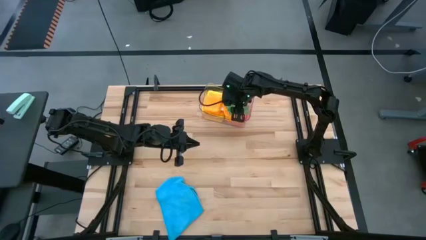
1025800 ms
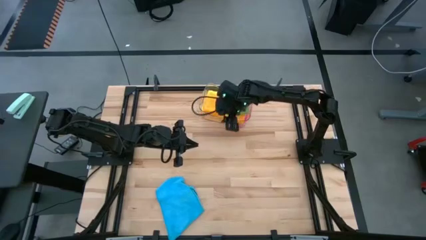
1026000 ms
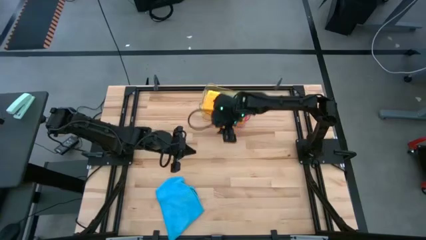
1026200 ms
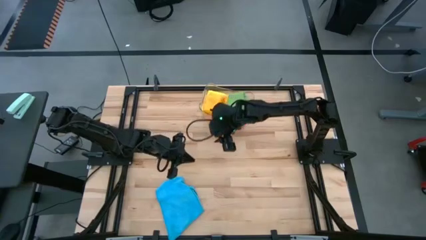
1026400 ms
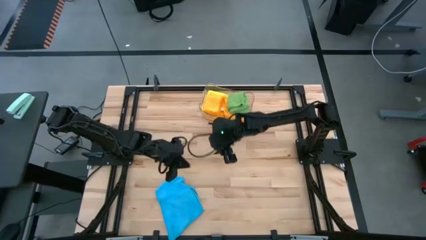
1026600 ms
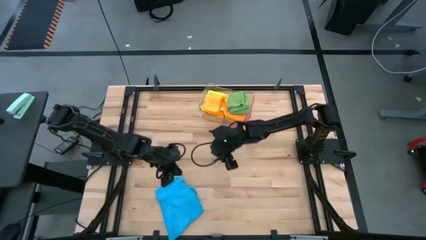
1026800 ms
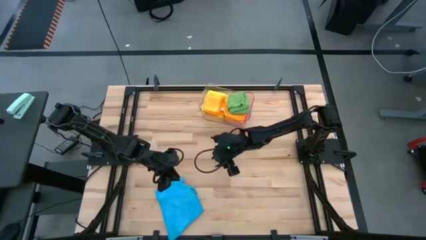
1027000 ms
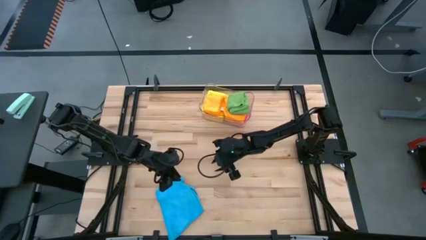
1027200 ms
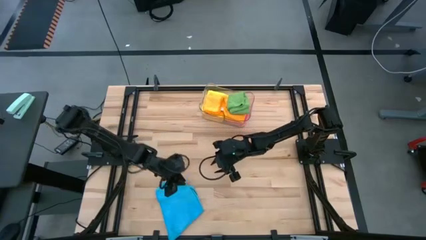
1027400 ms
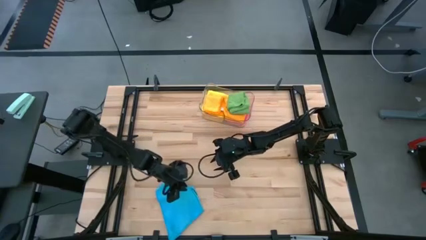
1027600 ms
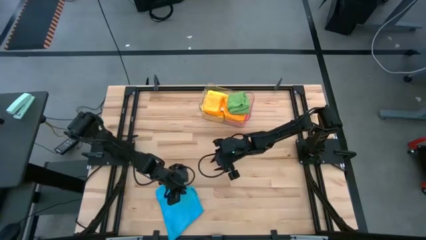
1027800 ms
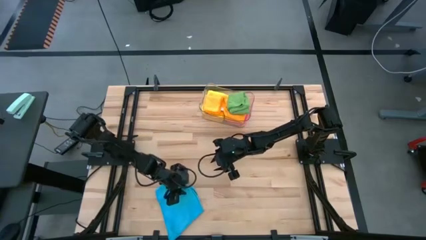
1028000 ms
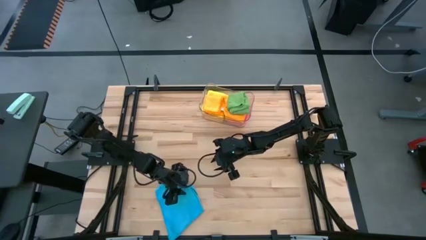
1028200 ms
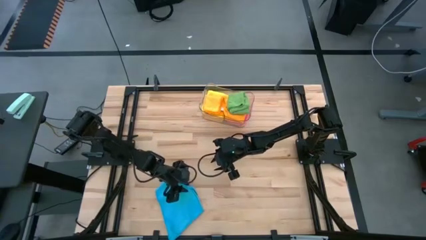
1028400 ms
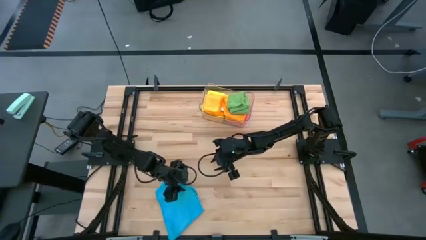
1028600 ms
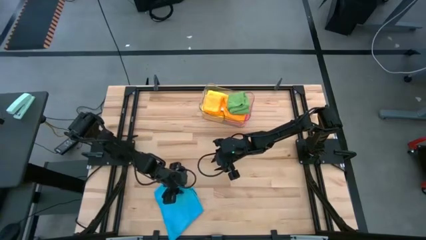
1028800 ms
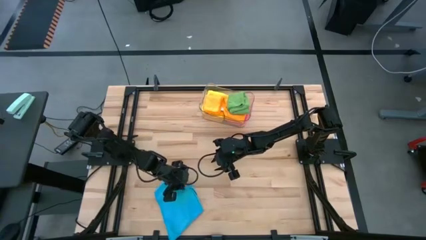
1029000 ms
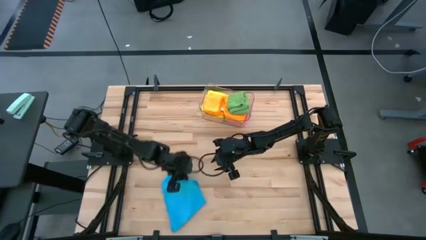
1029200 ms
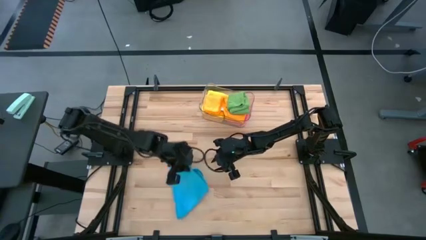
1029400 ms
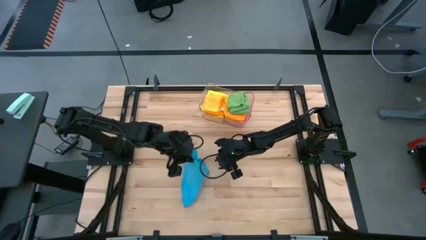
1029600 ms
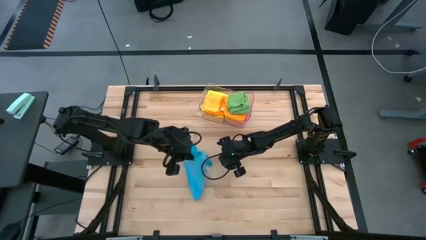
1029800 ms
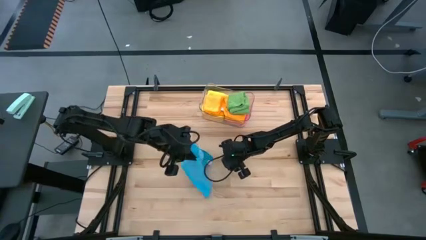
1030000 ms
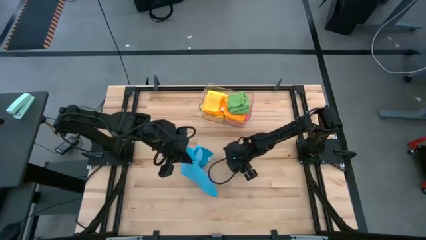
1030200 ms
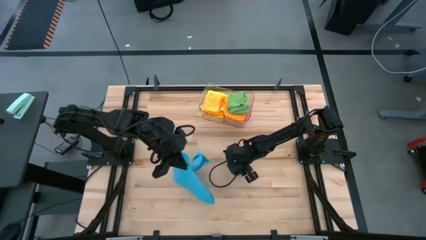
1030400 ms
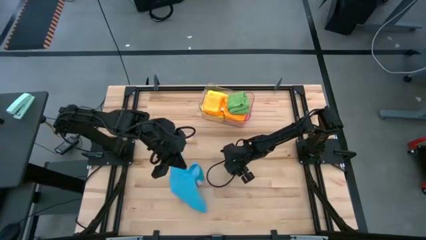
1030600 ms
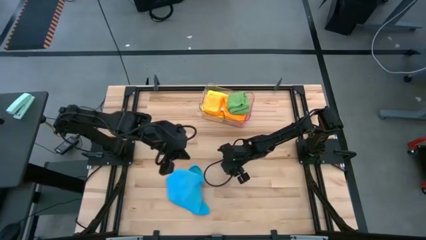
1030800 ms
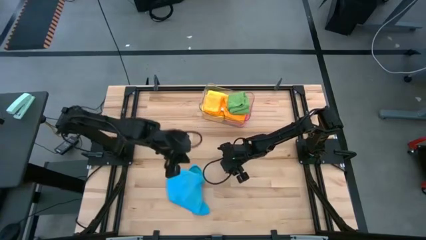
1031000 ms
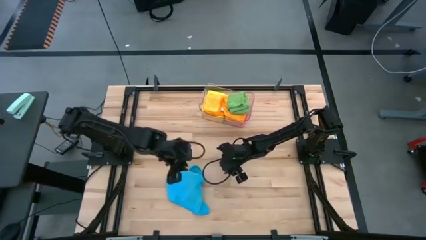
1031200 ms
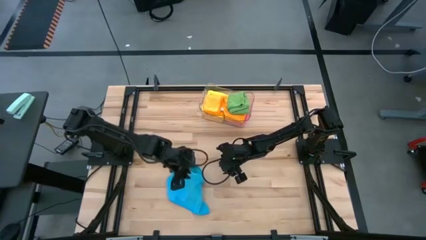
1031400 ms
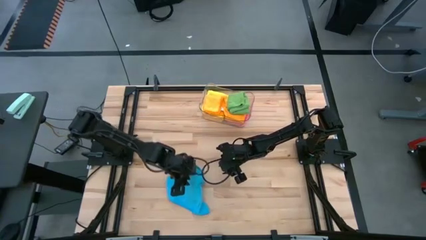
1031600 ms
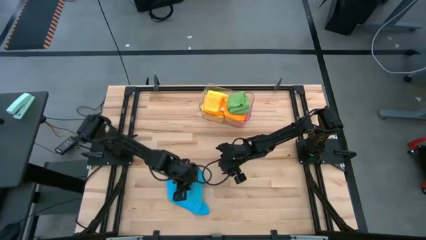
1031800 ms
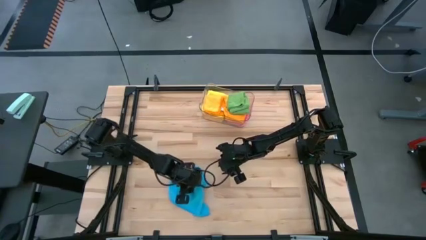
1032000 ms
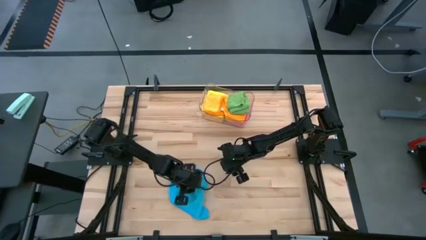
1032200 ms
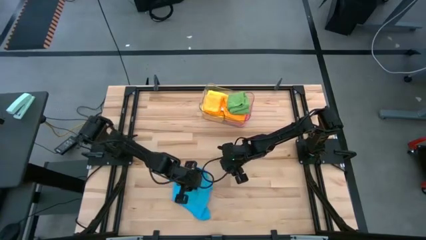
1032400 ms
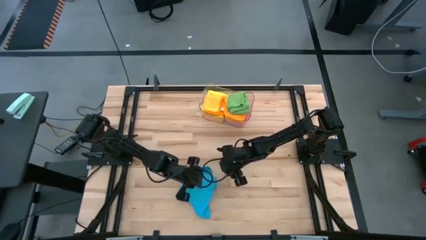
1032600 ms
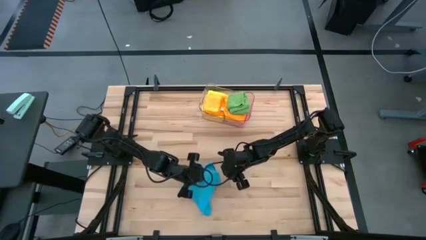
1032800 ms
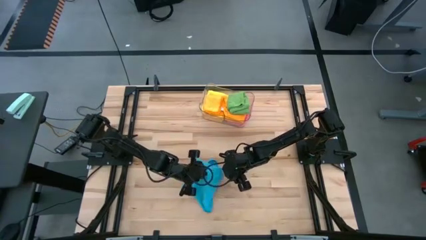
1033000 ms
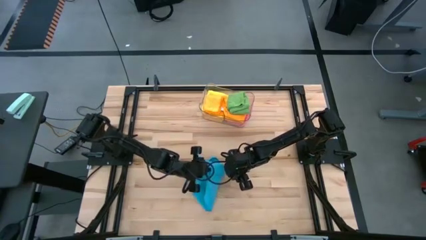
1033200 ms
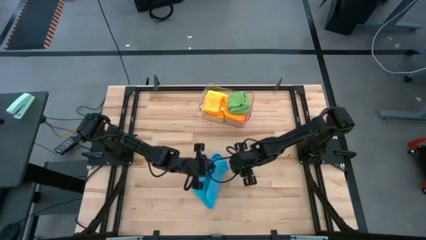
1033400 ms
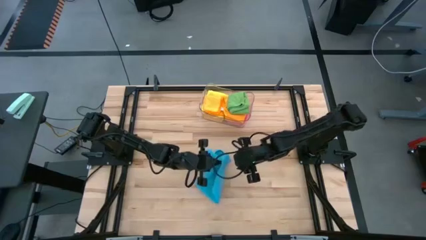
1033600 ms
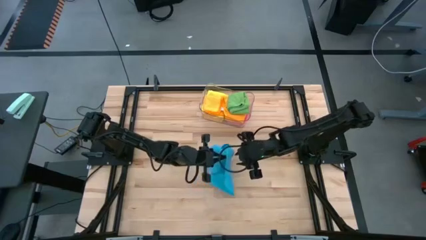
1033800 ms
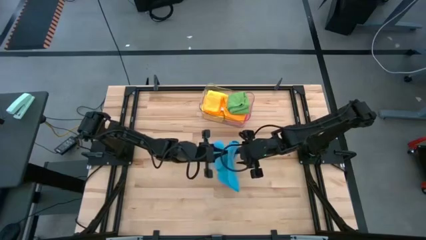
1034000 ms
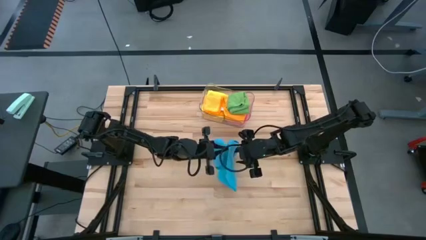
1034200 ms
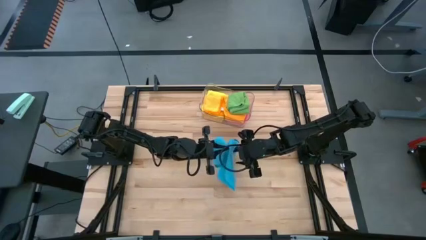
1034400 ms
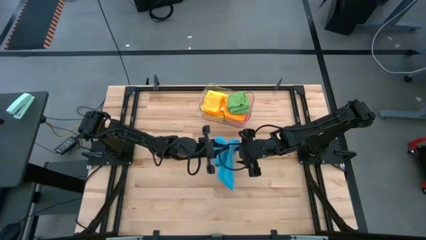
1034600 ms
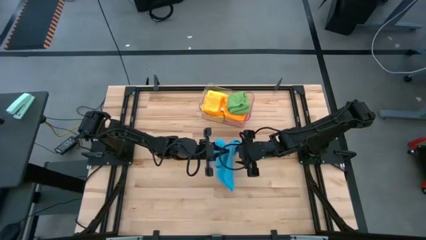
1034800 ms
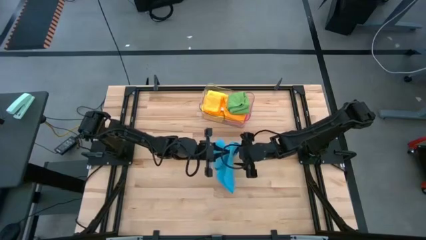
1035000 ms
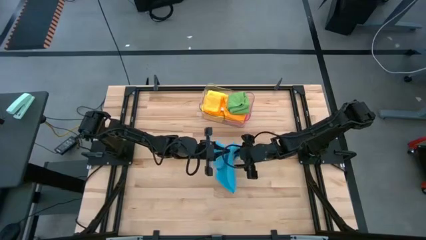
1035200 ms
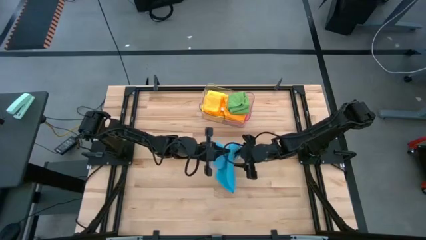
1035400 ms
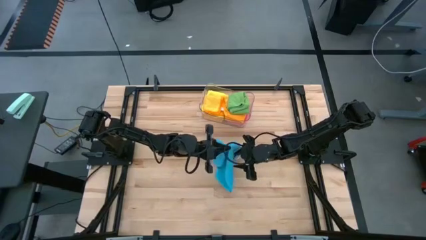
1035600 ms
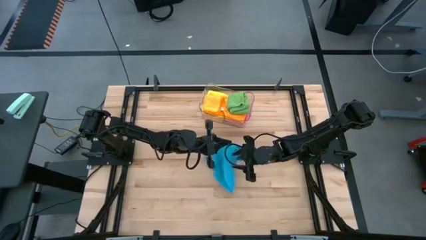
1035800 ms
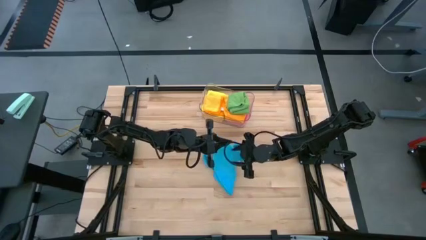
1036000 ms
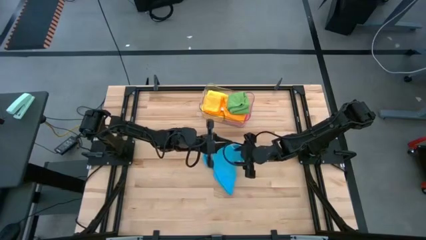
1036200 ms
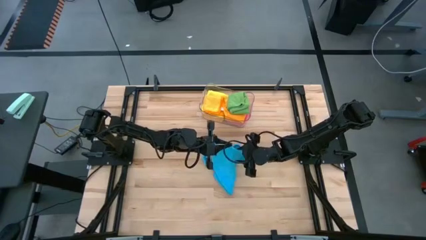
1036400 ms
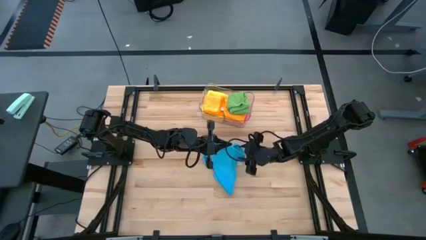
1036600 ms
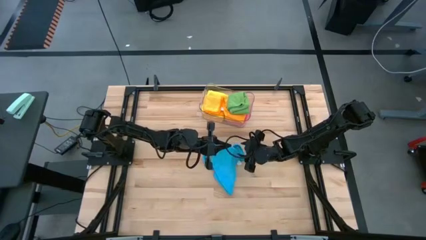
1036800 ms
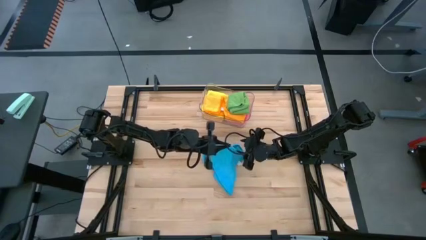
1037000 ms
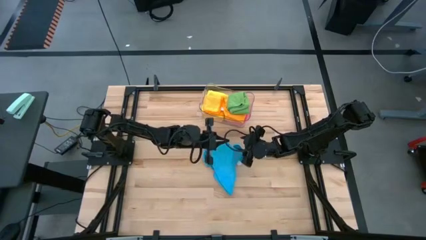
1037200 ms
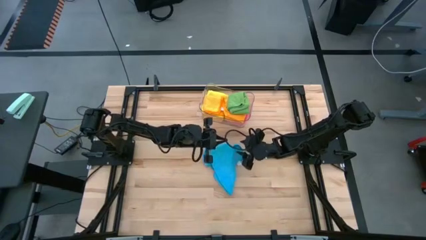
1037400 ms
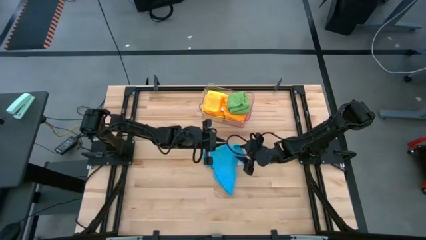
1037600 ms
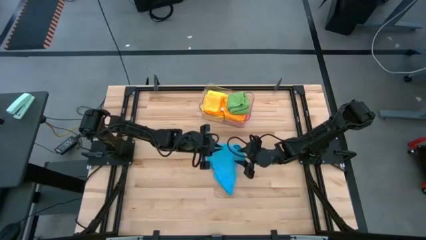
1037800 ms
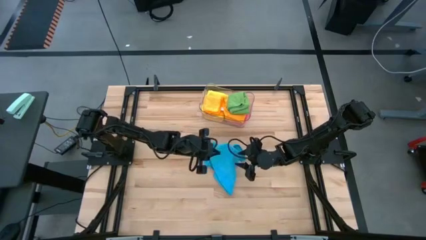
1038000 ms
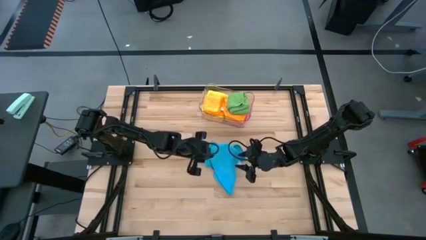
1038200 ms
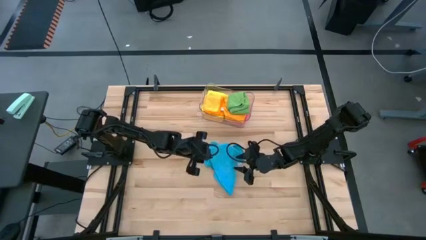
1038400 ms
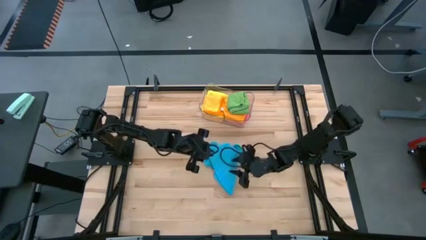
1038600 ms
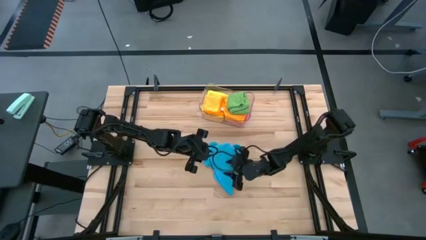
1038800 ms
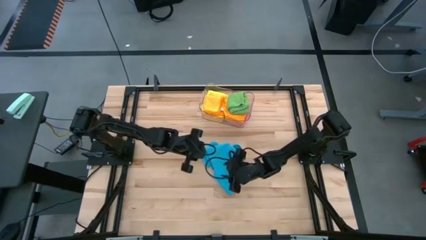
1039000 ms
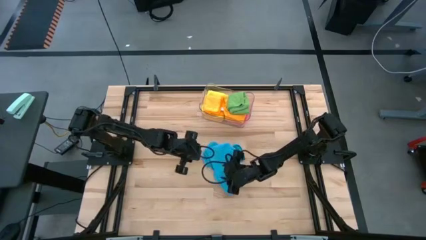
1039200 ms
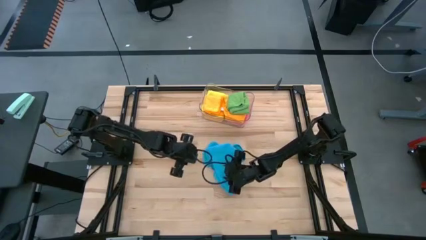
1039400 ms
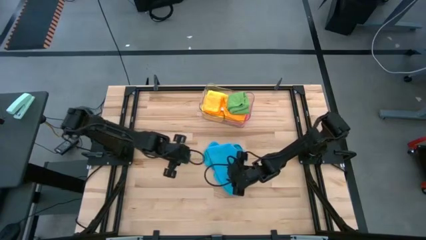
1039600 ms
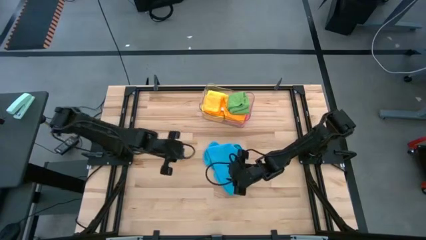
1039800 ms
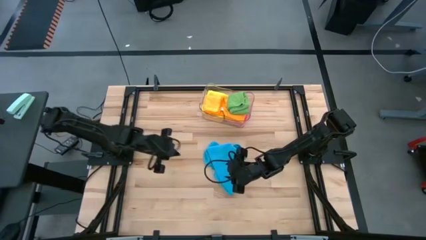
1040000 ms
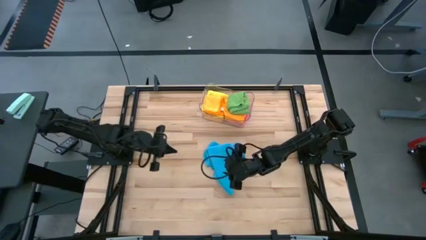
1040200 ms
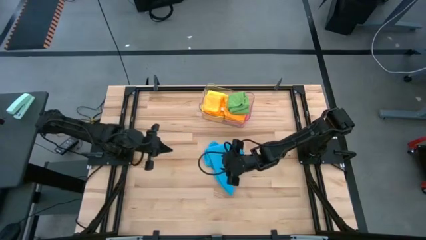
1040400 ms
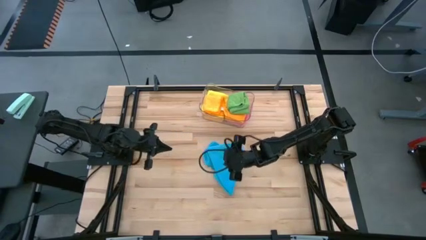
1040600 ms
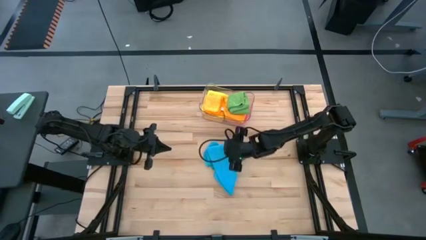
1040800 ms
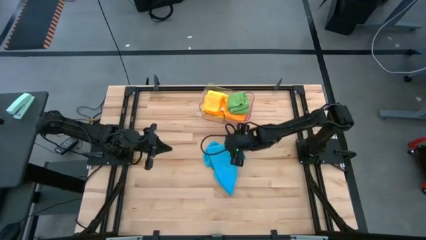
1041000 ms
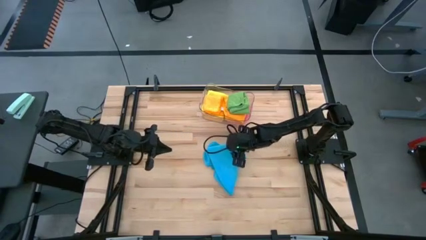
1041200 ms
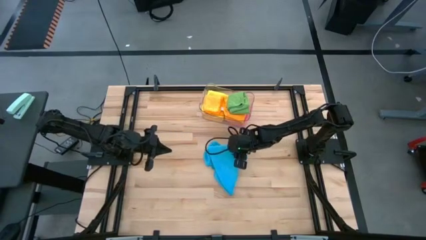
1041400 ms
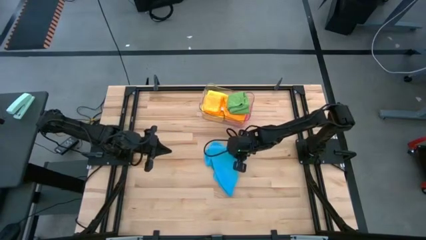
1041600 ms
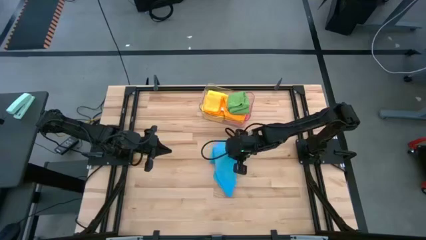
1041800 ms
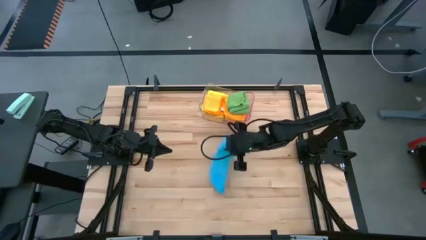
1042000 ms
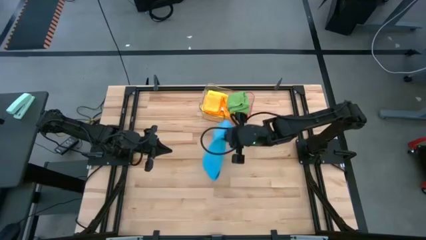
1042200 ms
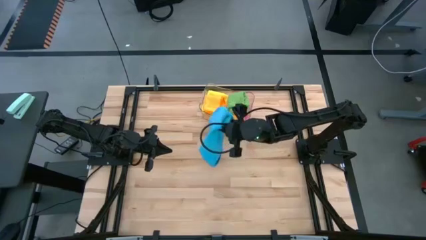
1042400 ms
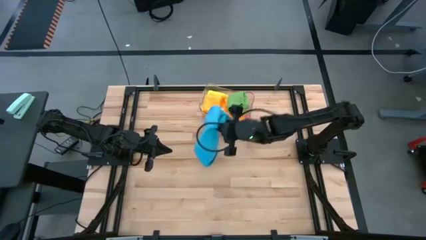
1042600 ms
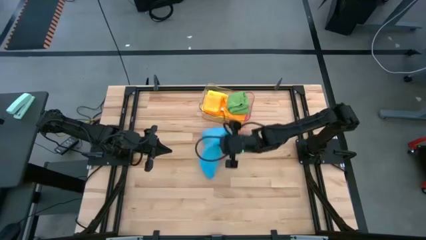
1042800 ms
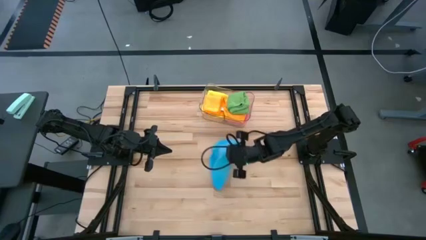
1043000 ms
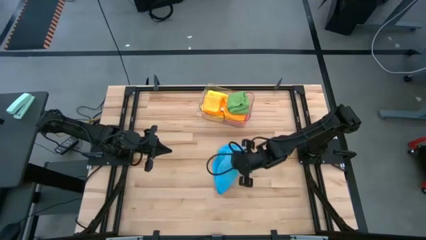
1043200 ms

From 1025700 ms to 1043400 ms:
Task: Fold microfiber towels
Fold the blue microfiber cloth
